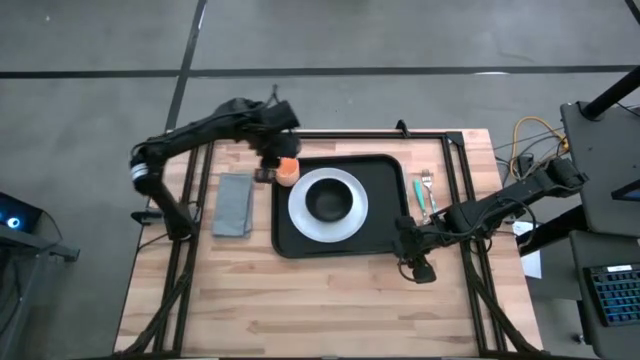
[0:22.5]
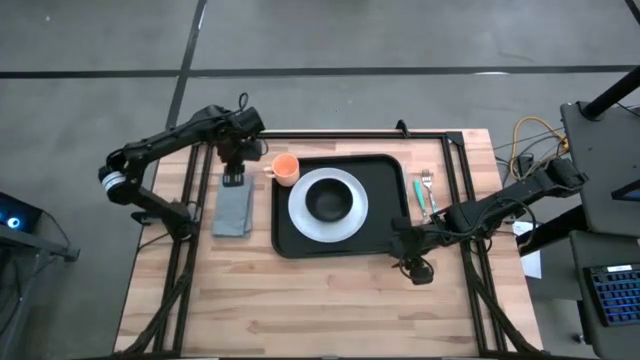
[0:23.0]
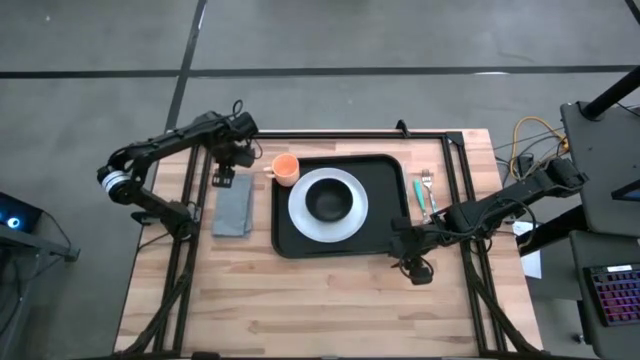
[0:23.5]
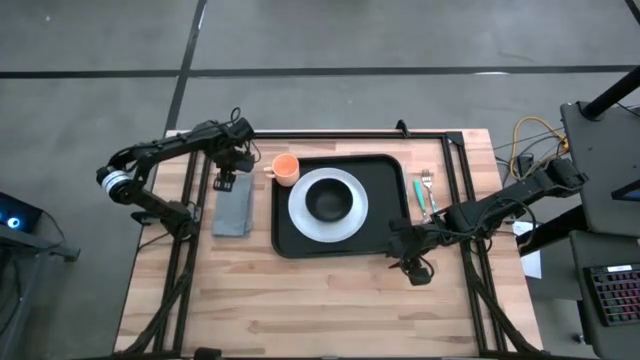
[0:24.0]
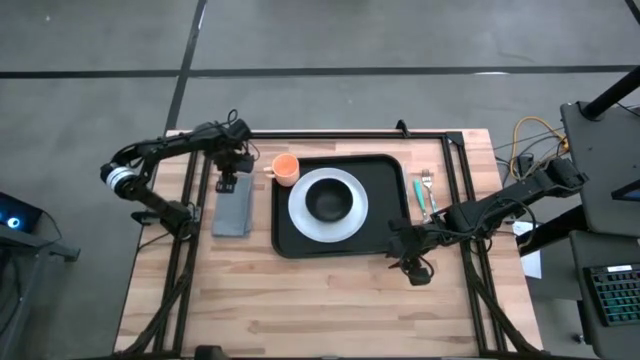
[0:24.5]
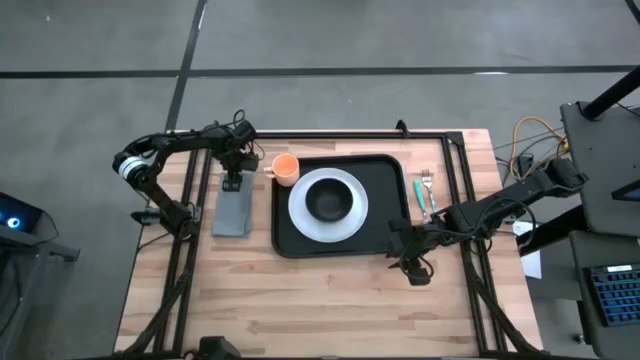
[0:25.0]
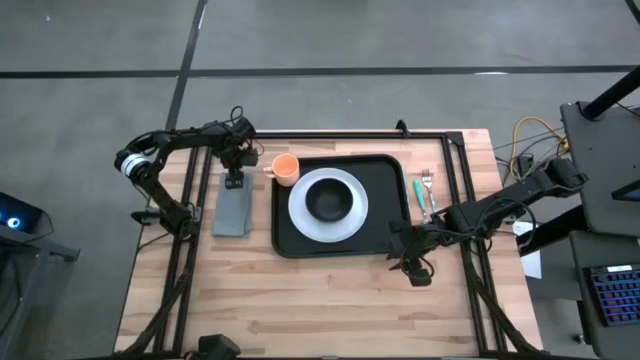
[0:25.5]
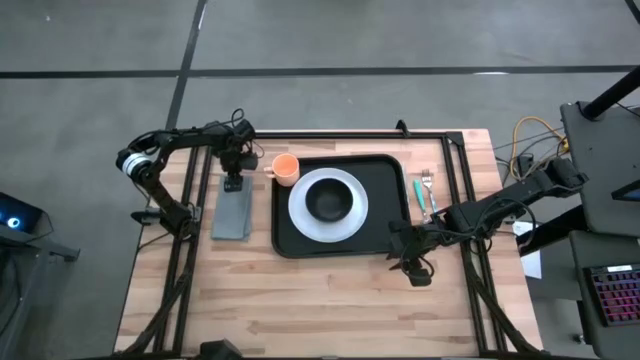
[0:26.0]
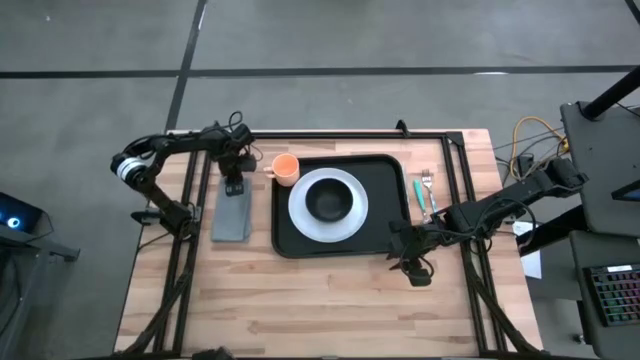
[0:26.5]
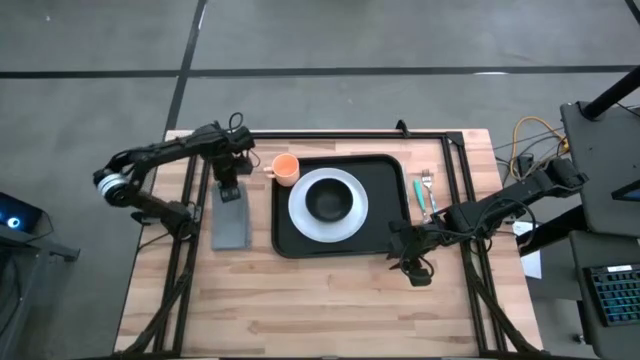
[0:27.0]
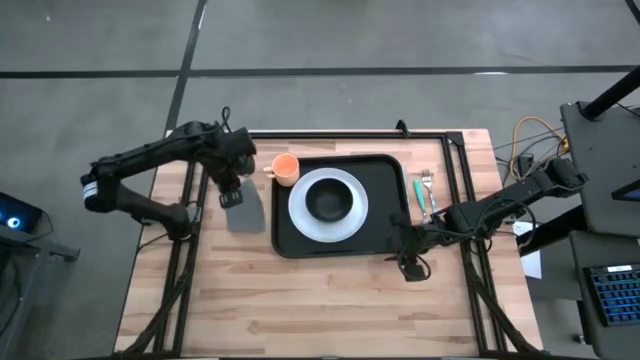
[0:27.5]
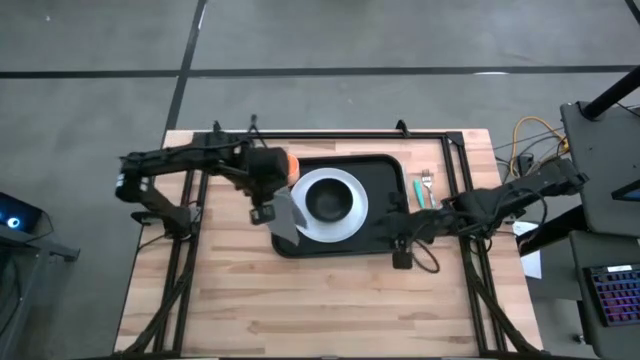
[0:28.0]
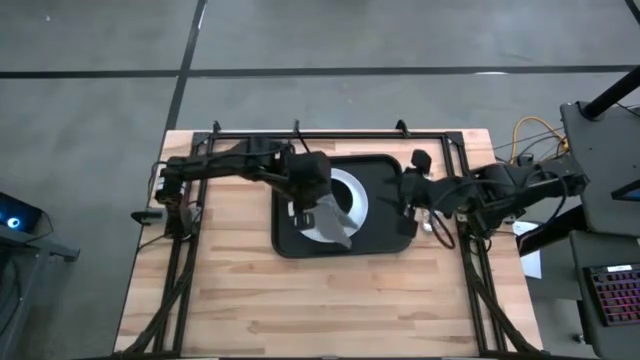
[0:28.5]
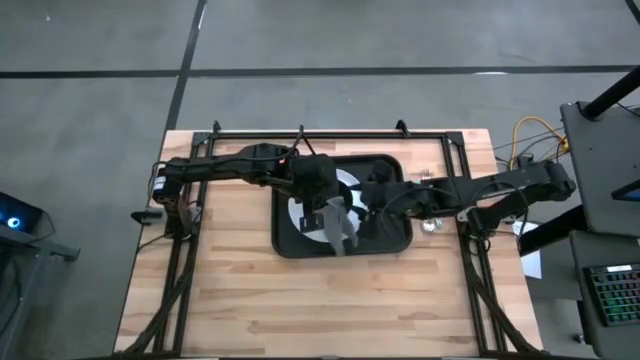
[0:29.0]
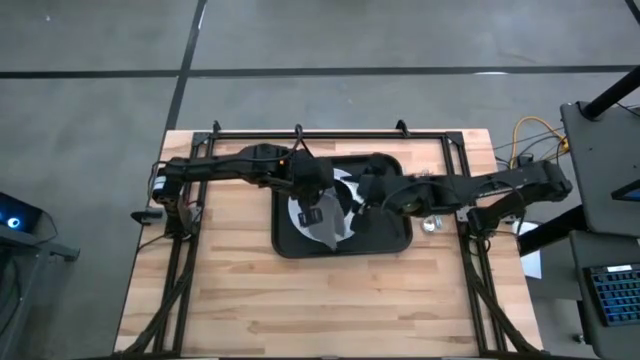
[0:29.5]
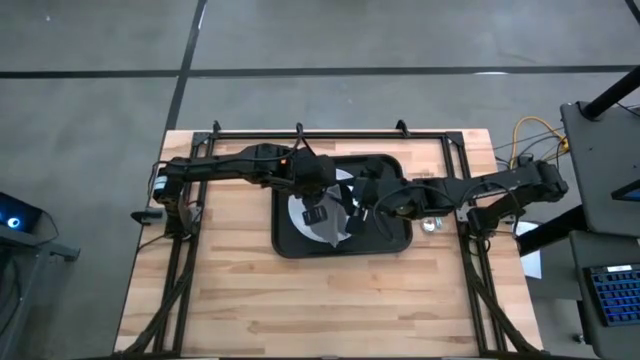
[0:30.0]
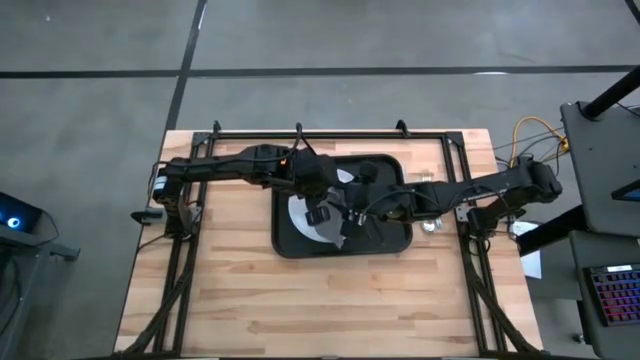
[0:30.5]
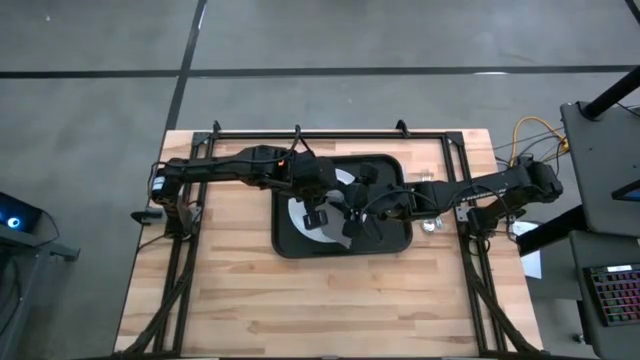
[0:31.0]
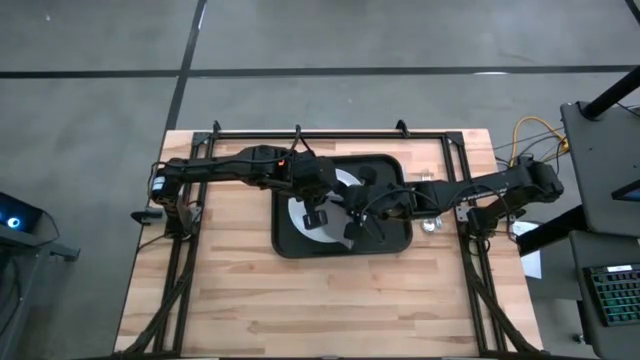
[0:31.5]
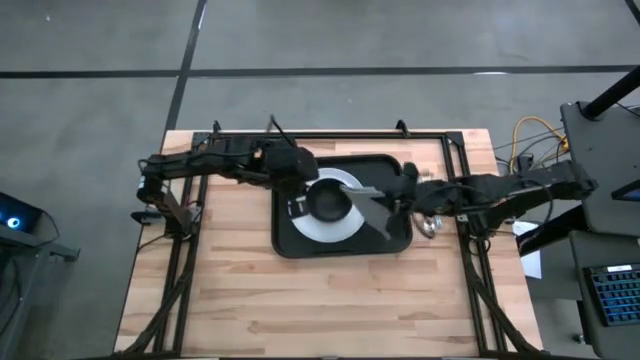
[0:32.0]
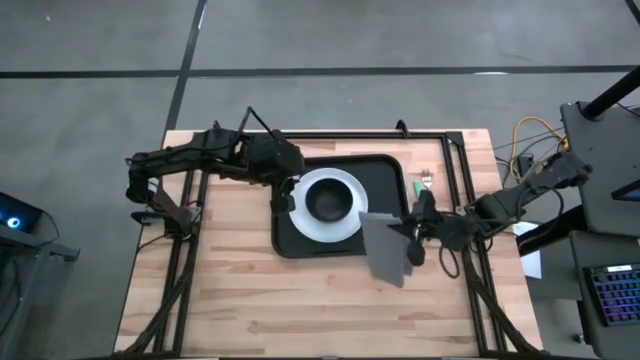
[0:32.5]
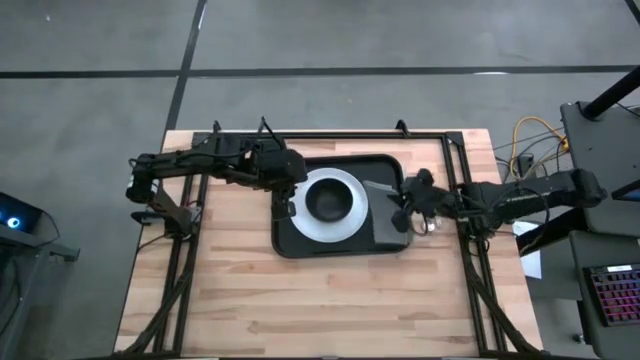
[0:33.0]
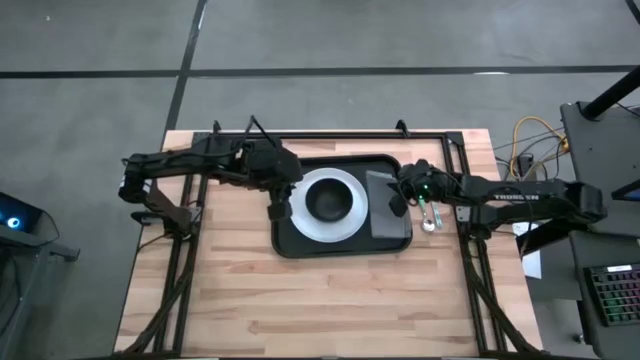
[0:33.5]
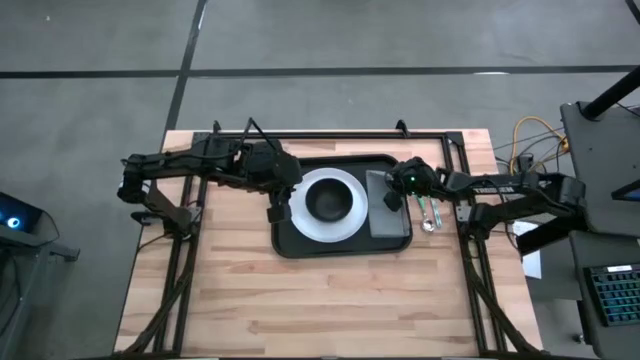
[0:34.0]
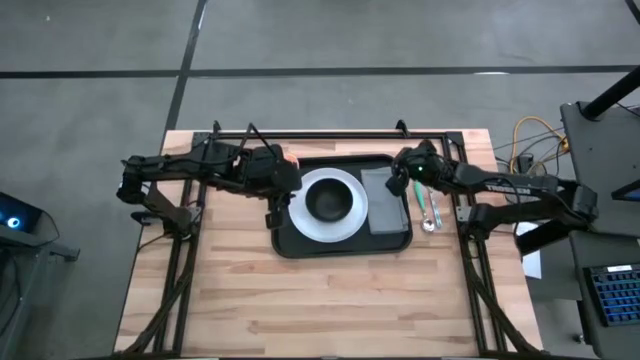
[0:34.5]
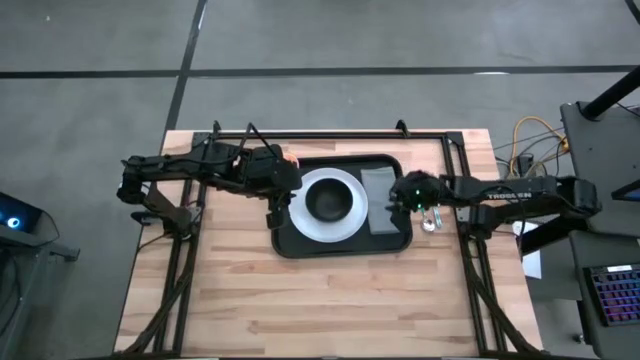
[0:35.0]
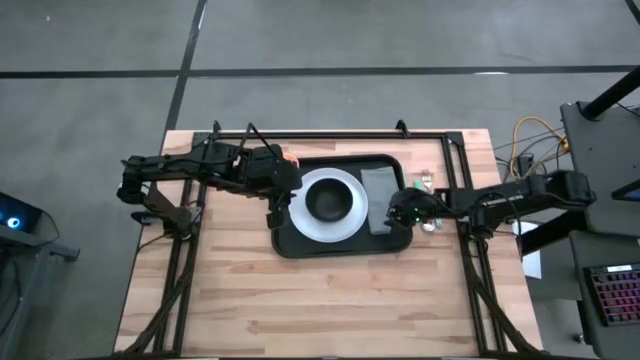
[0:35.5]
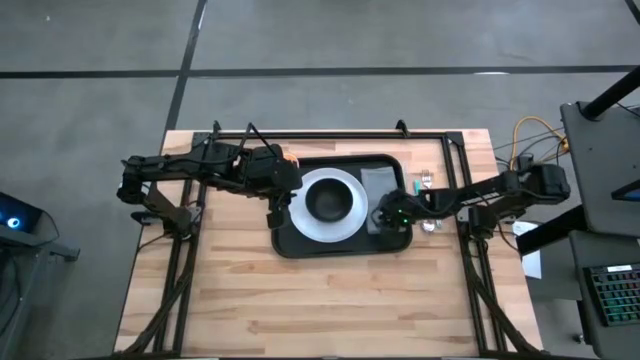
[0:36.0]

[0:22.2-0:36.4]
Task: Set up tray
Put the gray napkin on the black tray to the right of the white plate

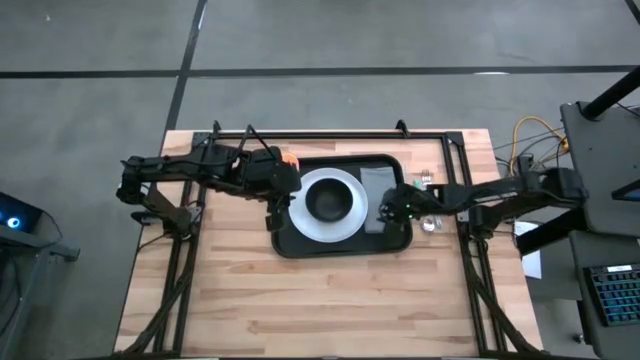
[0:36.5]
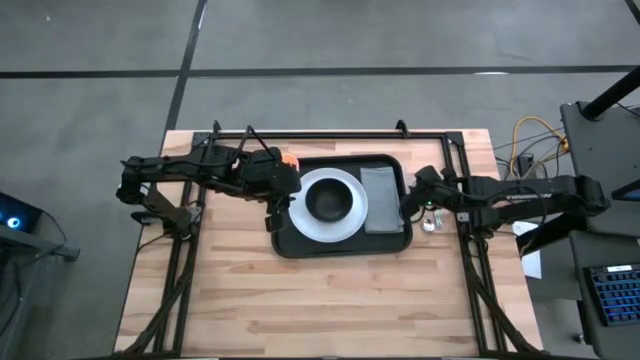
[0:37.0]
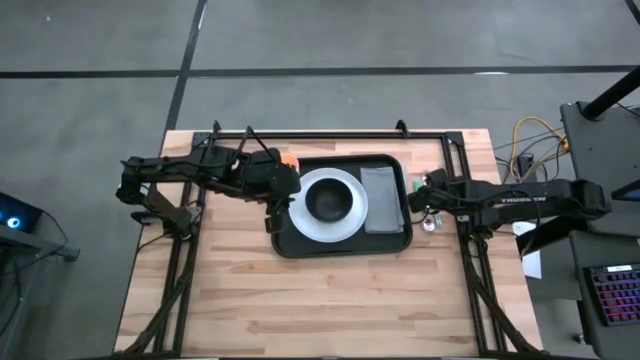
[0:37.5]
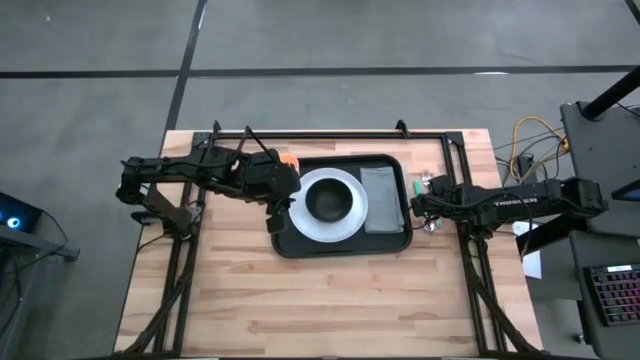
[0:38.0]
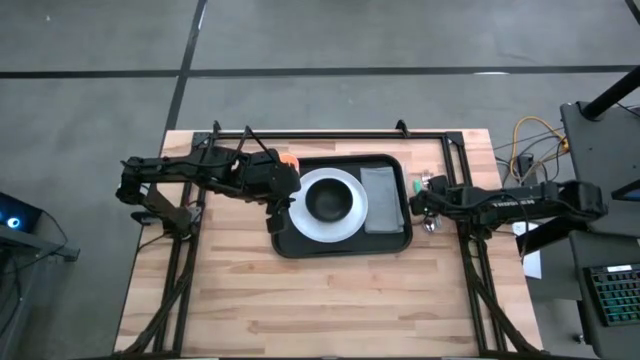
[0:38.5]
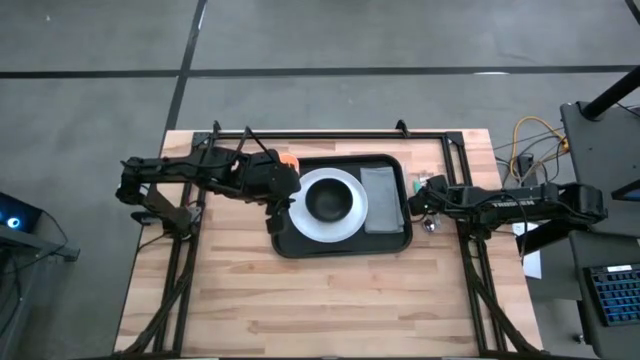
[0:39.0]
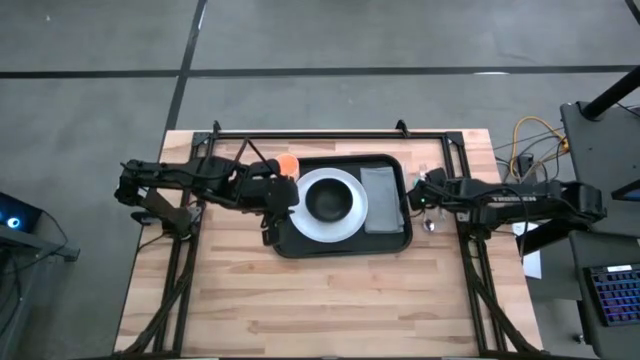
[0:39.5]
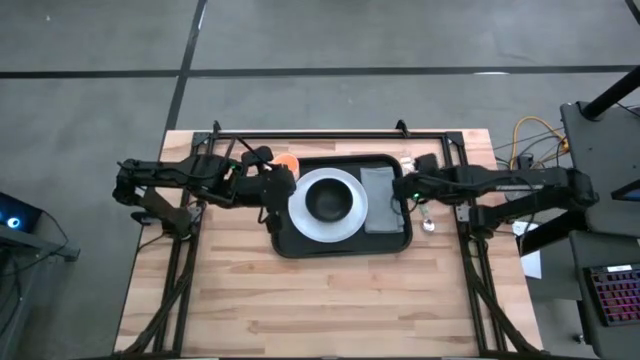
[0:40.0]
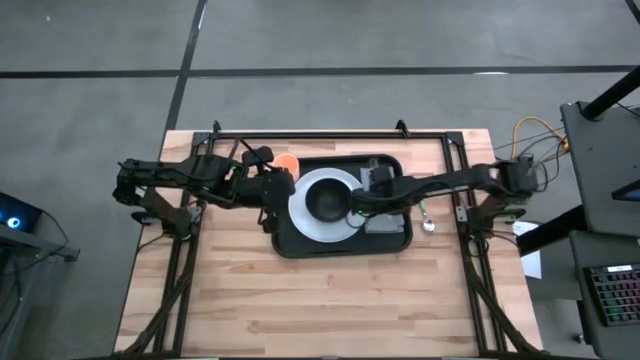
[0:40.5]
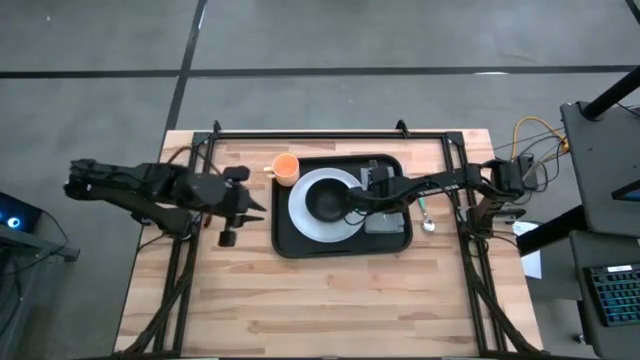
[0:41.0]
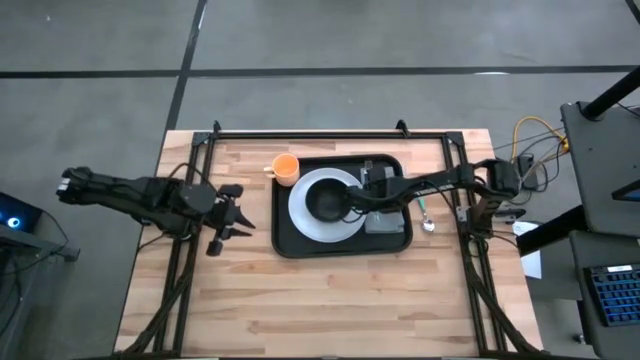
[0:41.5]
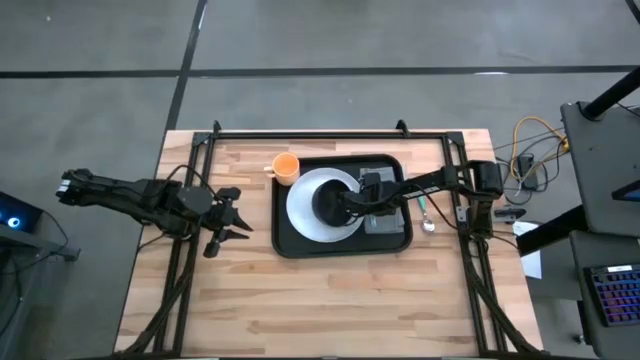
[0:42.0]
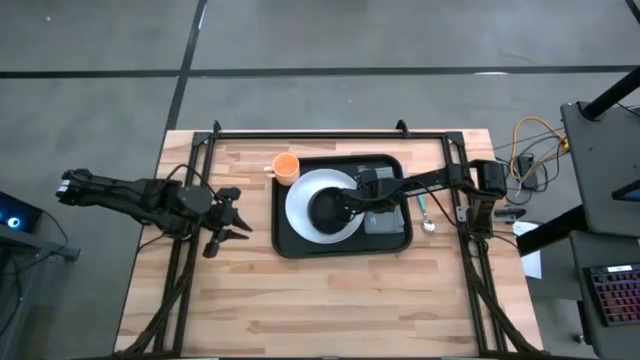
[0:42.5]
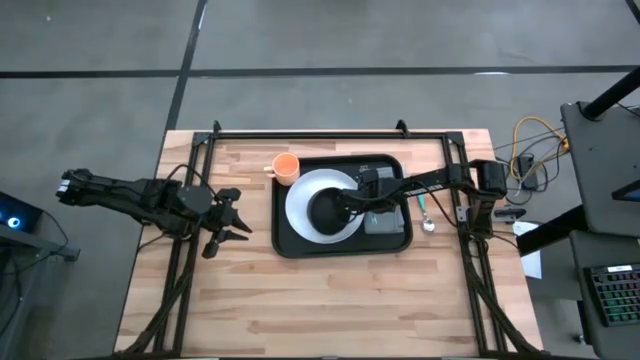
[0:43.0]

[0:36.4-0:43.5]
Put the white fork on top of the gray napkin

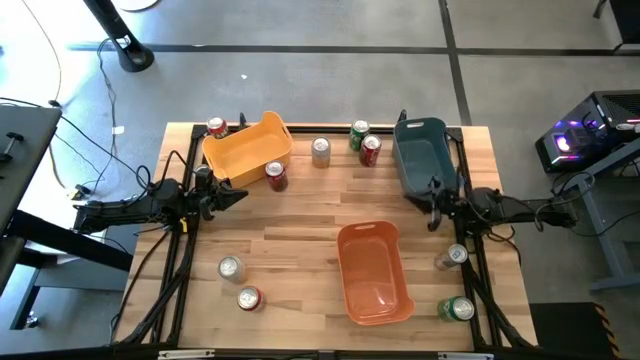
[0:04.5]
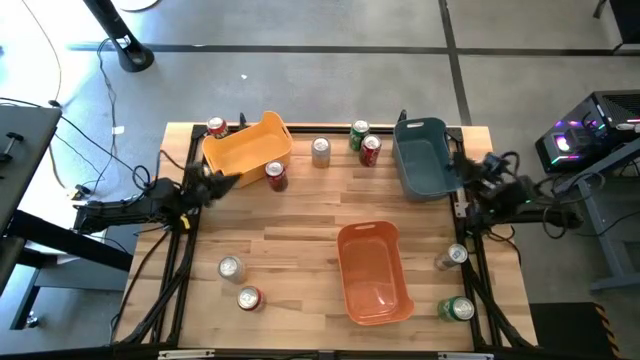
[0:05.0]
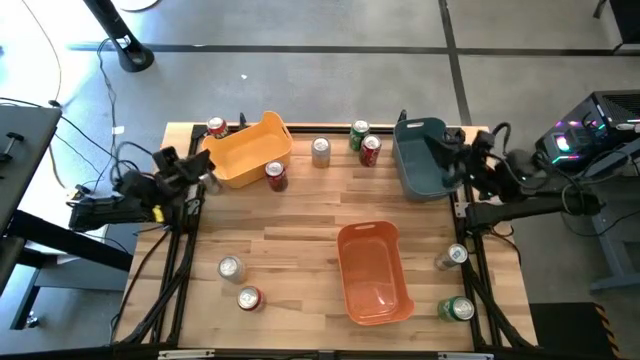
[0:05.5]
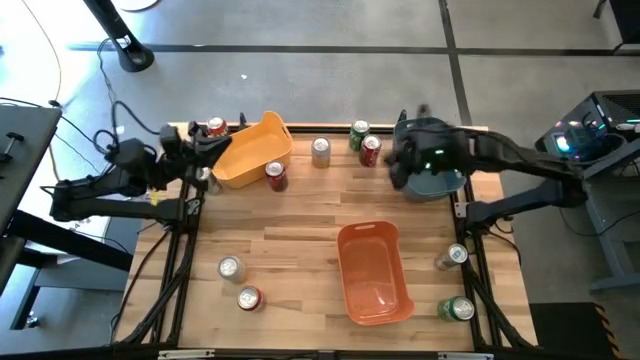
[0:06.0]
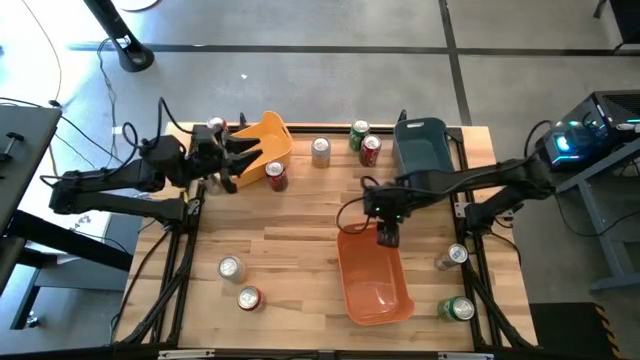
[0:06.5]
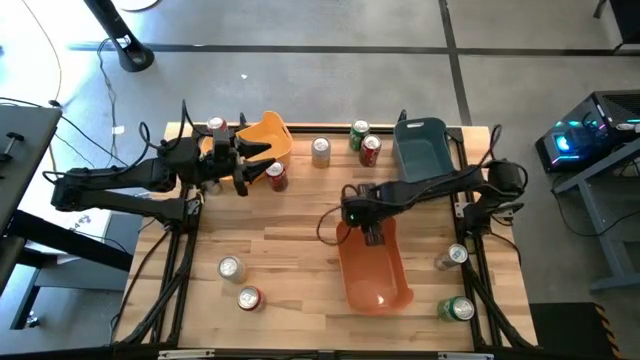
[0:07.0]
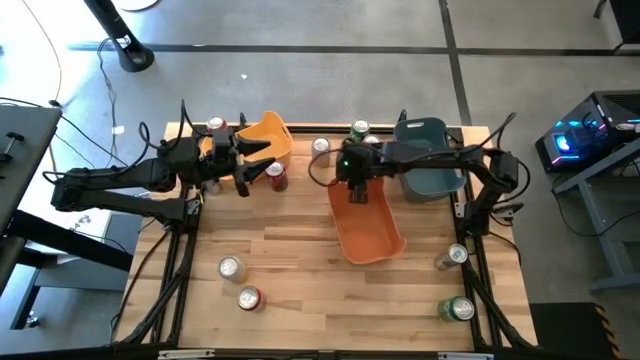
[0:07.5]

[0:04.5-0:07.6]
Task: Sort soda cans
Move the orange bin to the center of the table
